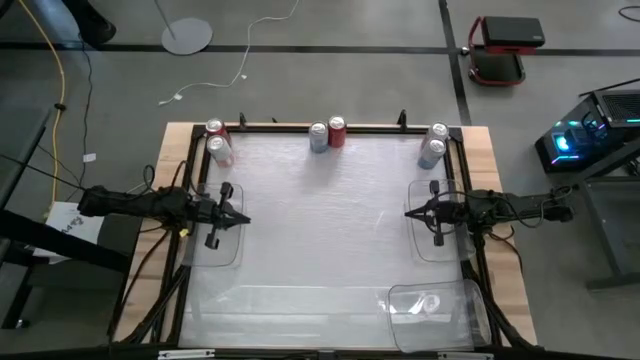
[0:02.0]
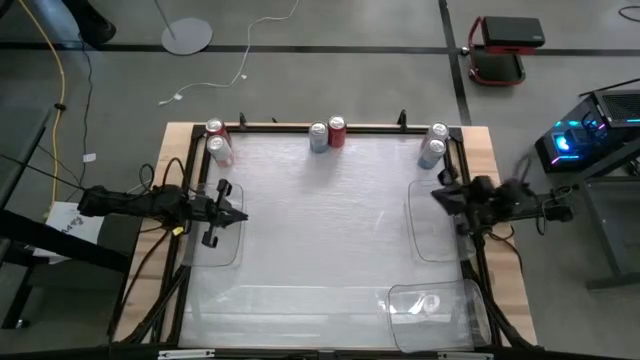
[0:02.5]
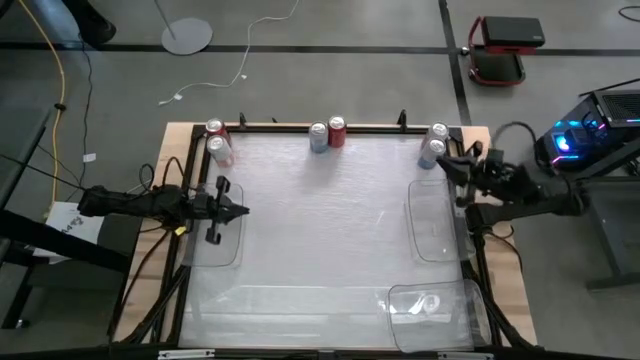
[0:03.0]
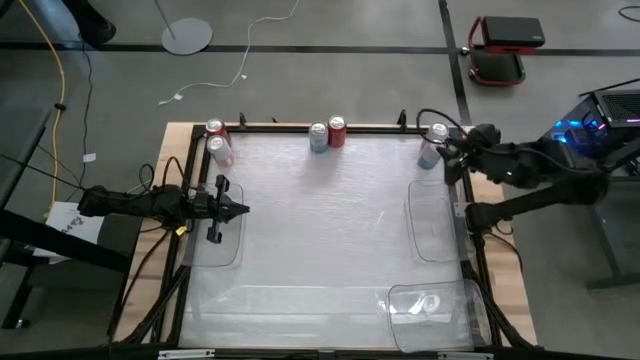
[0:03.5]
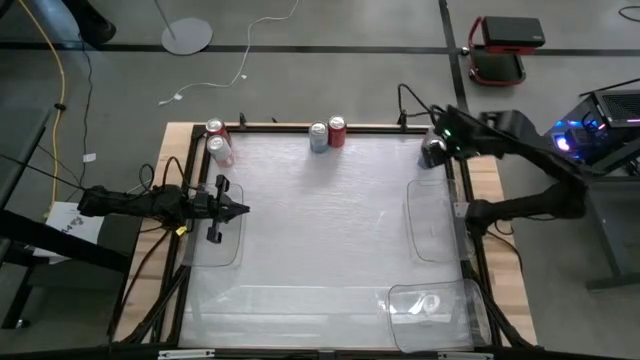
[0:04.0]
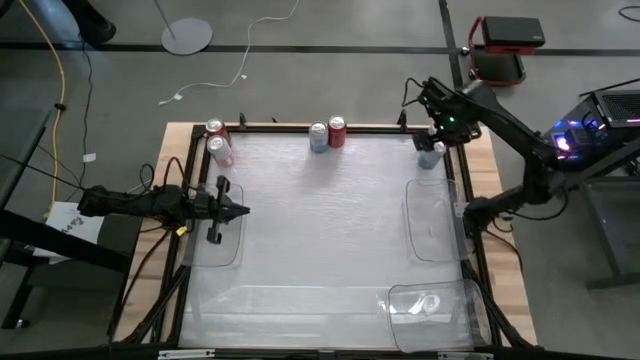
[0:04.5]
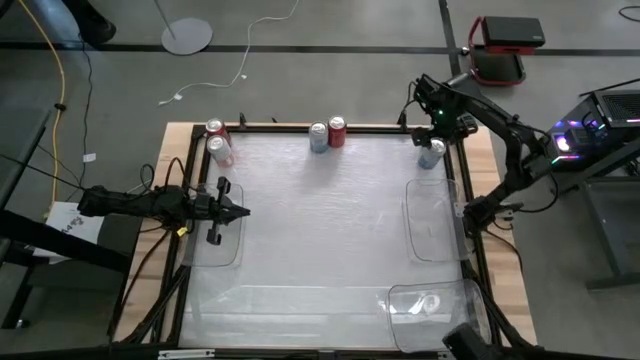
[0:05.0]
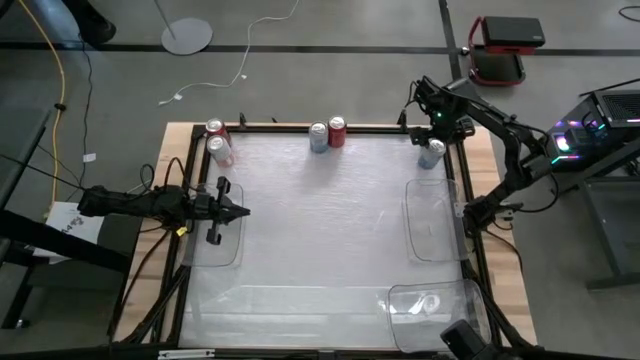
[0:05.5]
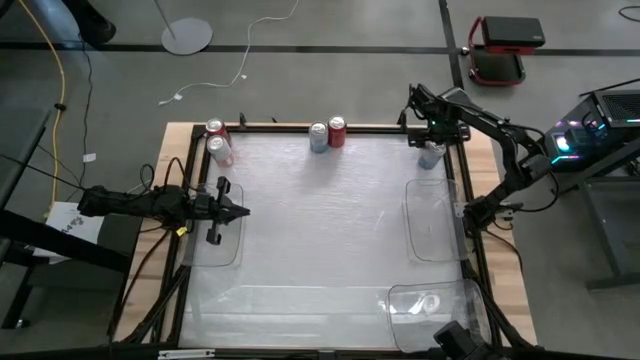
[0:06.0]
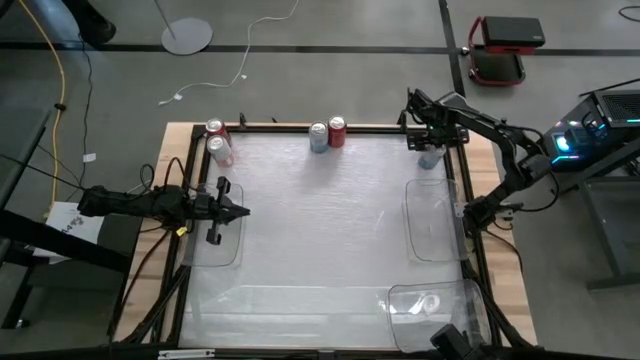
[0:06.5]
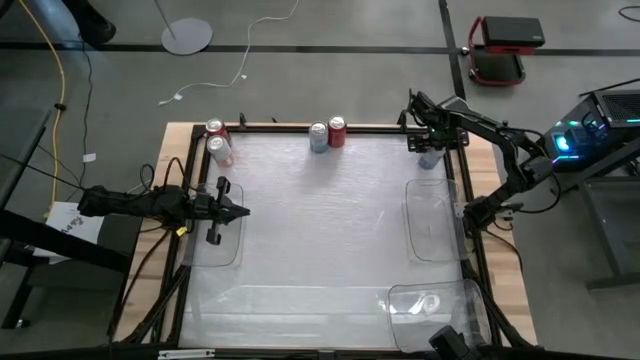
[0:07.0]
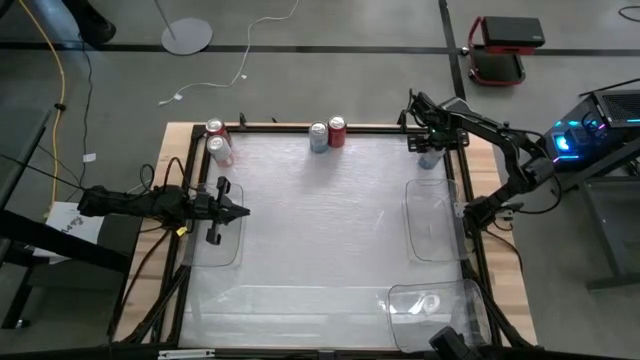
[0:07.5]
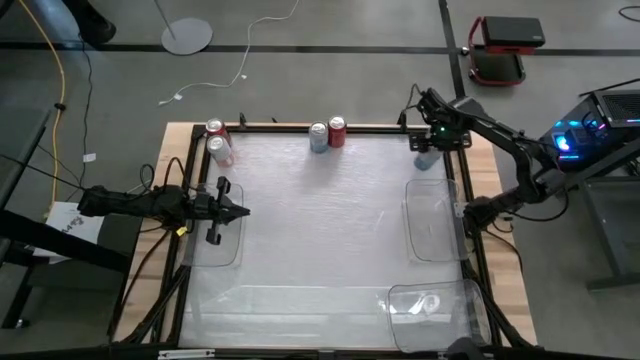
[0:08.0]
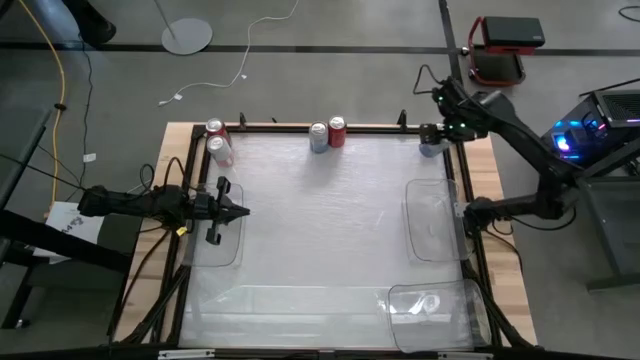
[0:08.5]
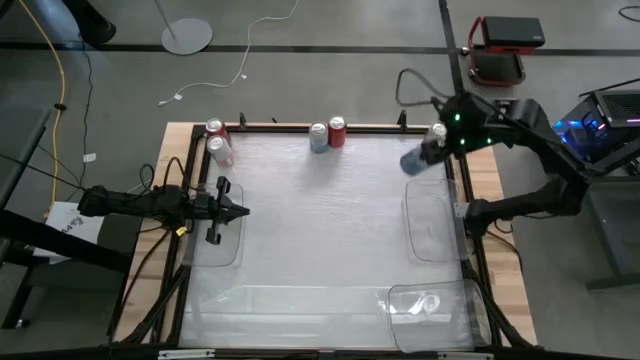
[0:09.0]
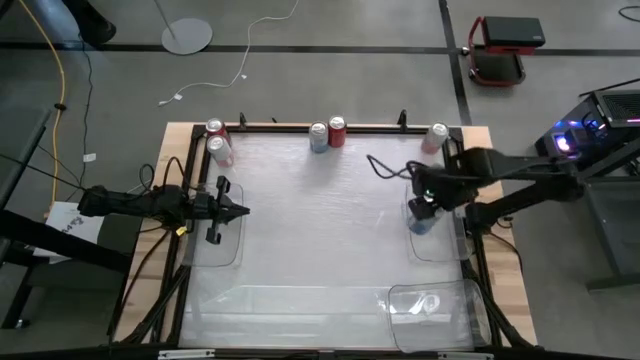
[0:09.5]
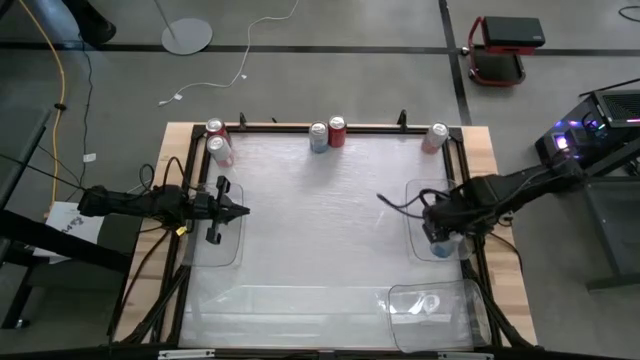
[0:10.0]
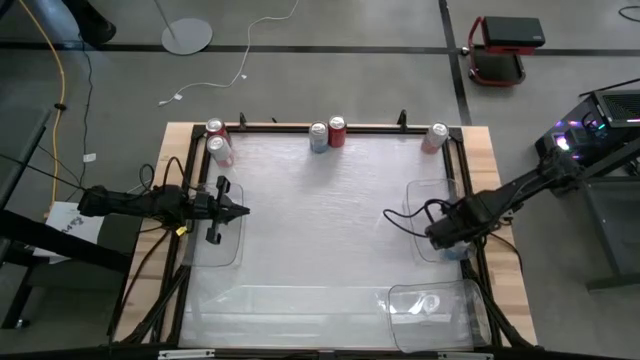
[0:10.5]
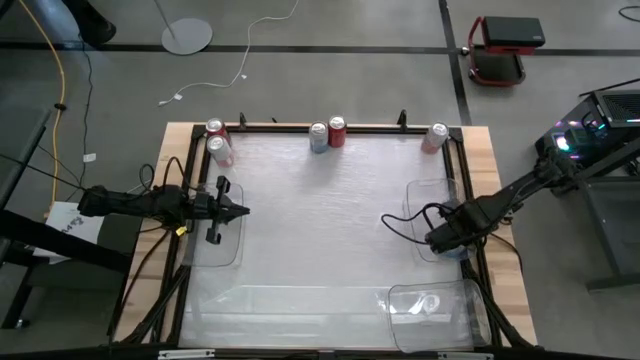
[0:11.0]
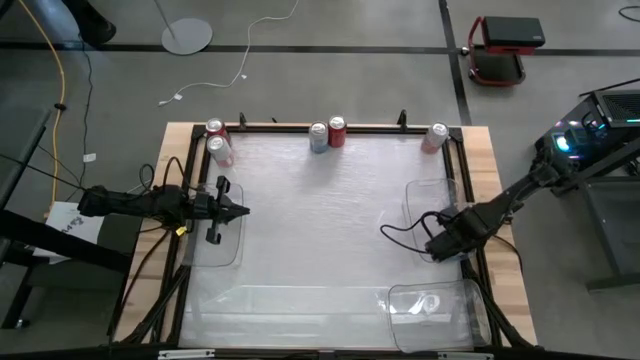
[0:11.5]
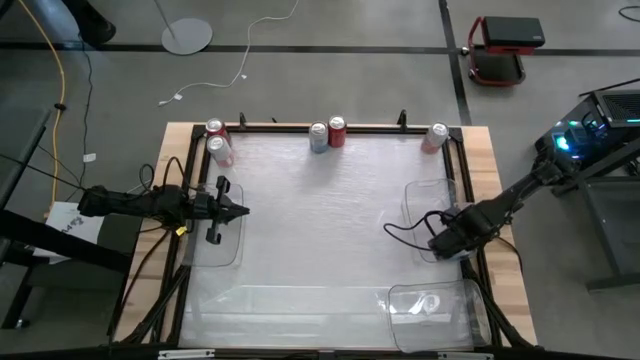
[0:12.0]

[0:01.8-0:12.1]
Task: Sort soda cans
Put the right blue-white soda can into the right transparent bin

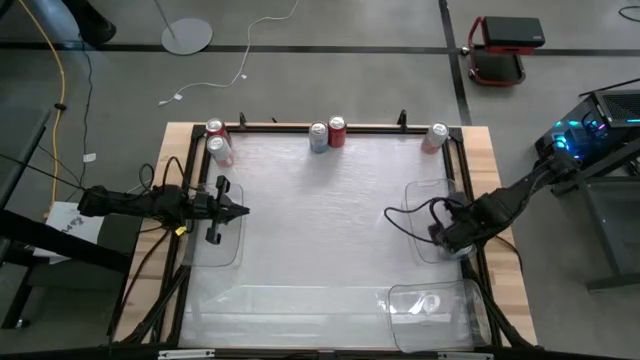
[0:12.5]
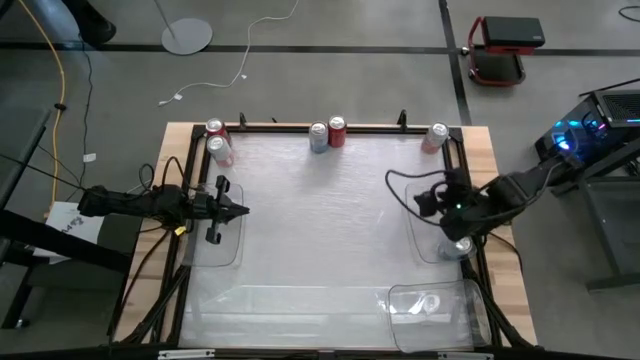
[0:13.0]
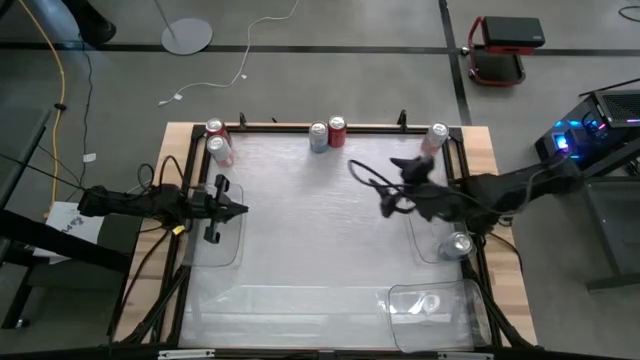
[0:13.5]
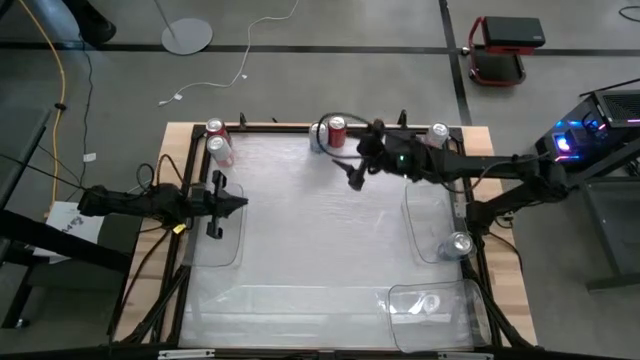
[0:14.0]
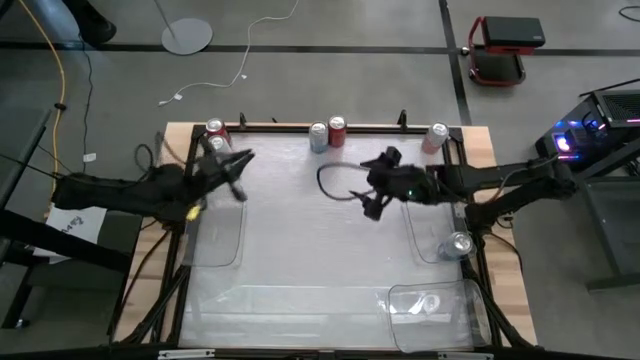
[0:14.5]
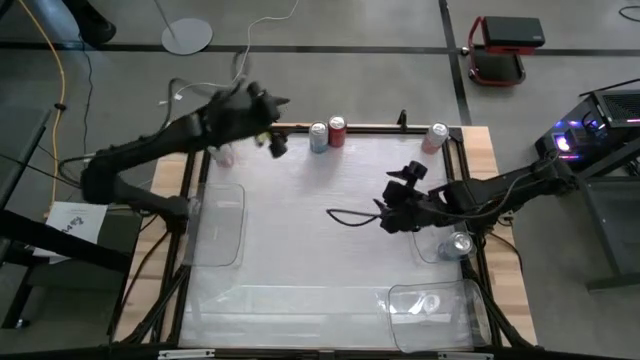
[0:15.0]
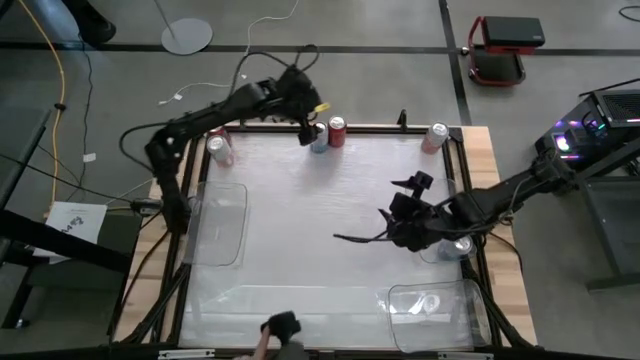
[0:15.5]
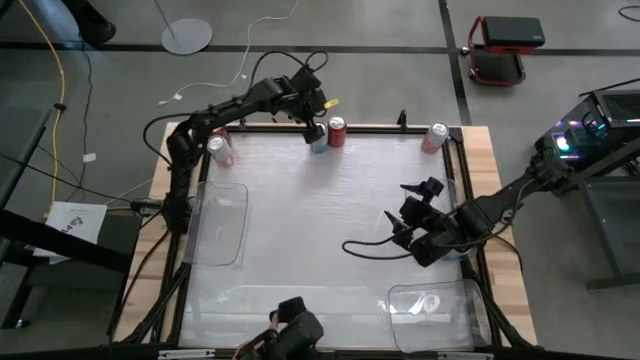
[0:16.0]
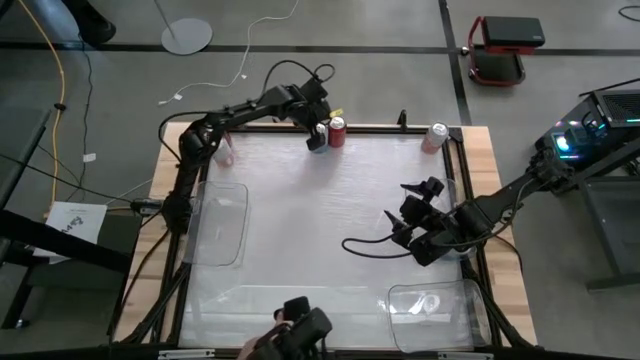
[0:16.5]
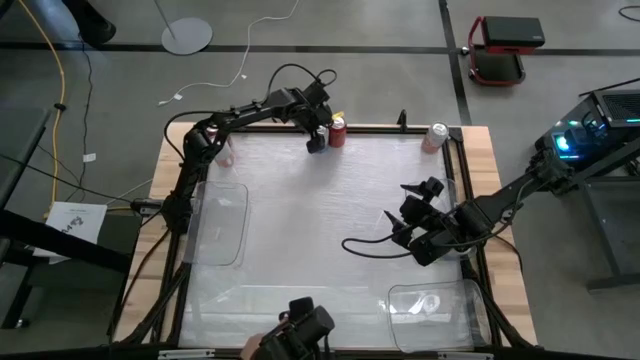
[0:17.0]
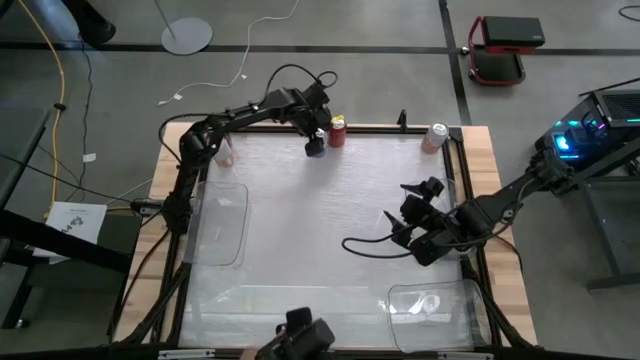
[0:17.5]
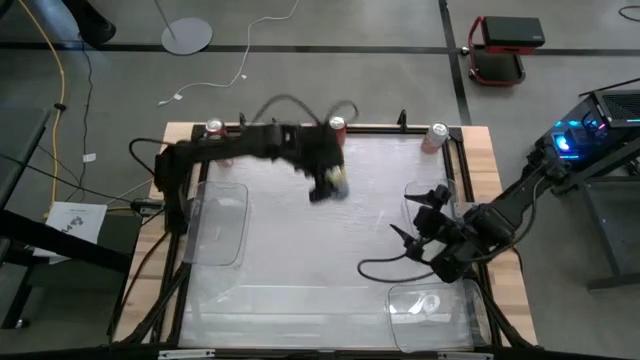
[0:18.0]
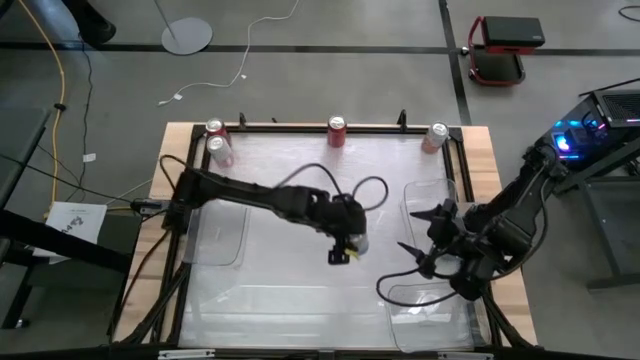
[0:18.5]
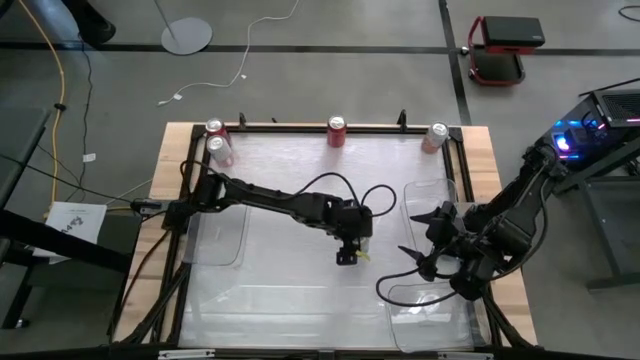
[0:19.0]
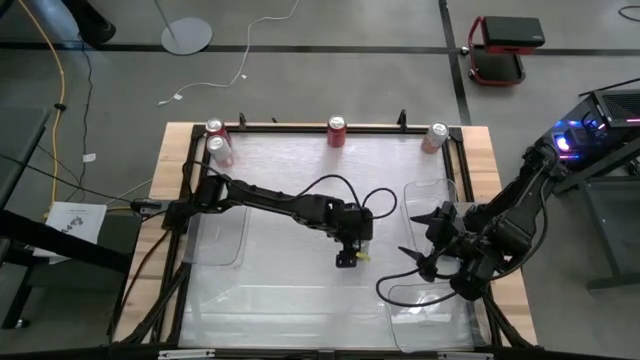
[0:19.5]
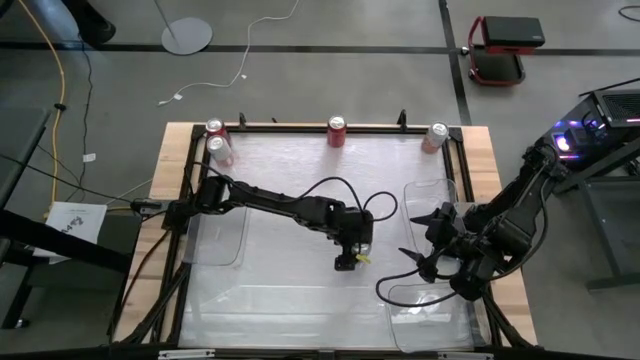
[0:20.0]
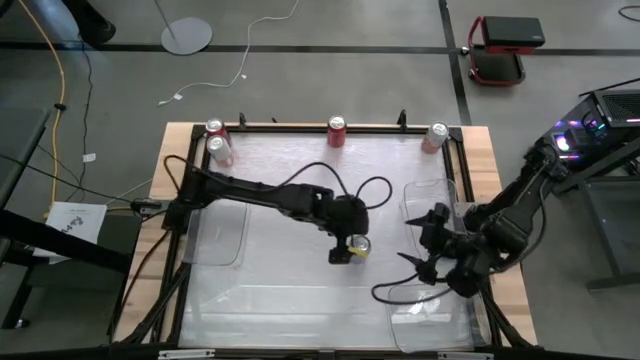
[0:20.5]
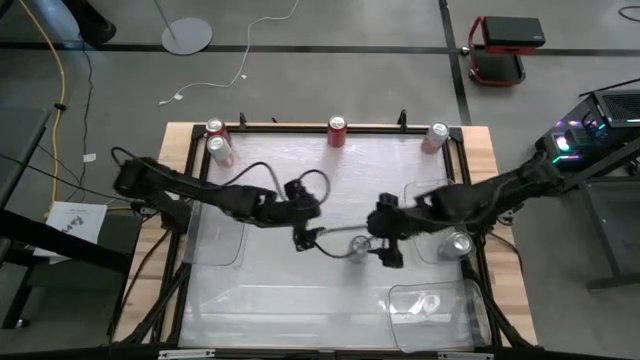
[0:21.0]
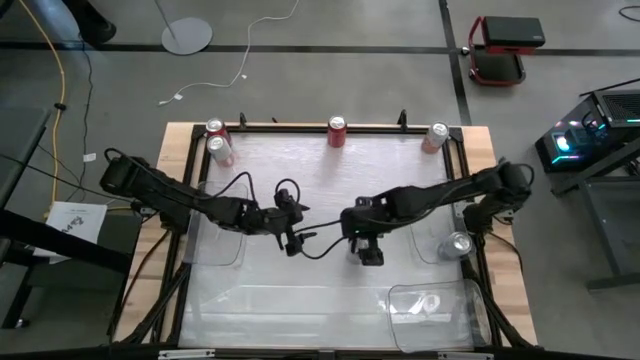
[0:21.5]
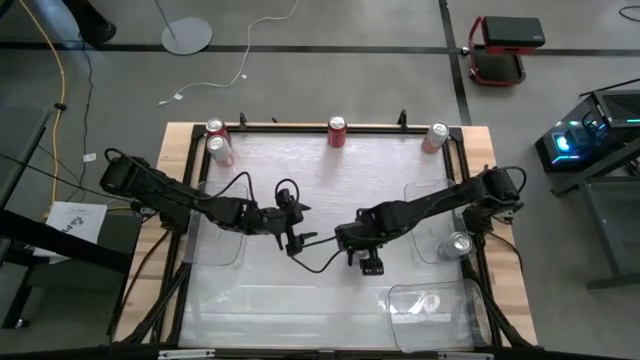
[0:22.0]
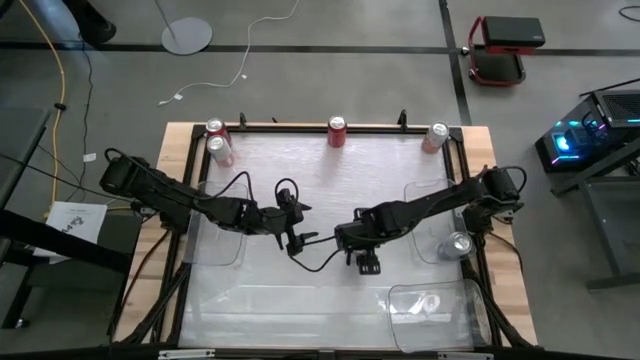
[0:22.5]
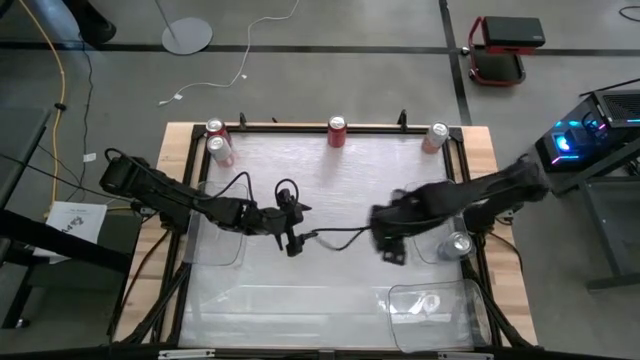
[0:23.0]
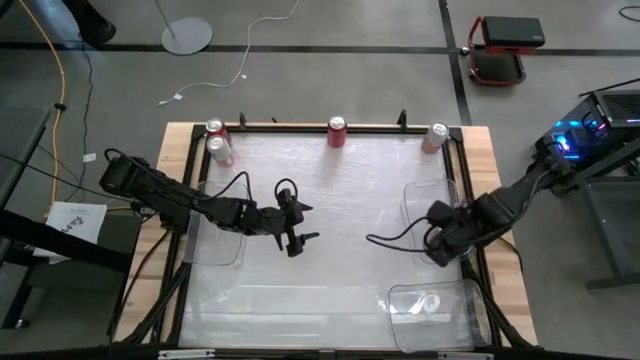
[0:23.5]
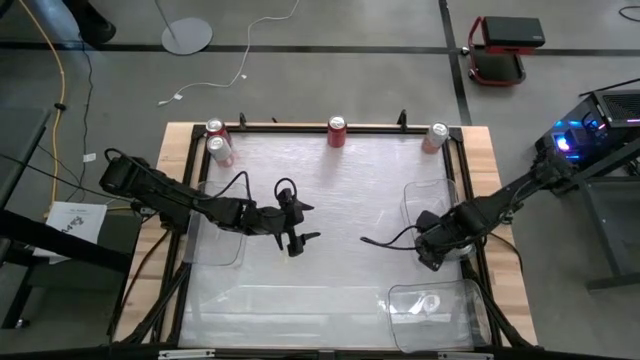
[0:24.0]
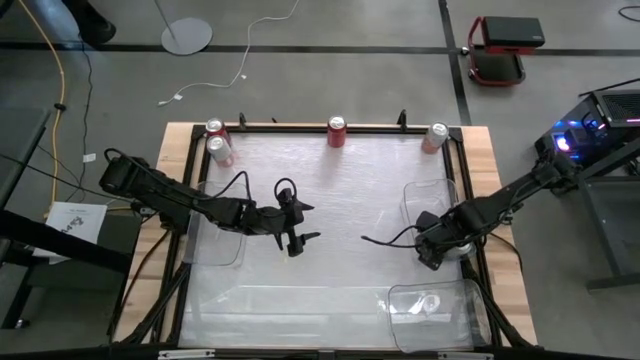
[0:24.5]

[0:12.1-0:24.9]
Put the blue-white soda can into the right transparent bin
